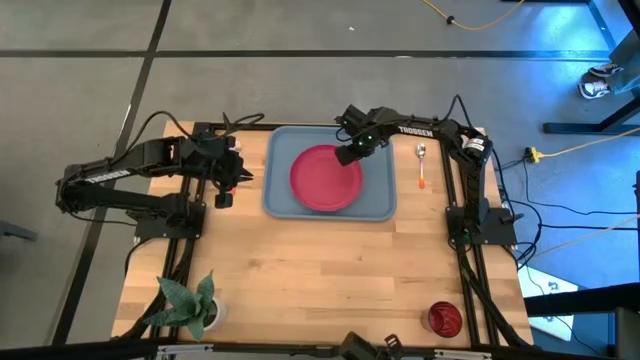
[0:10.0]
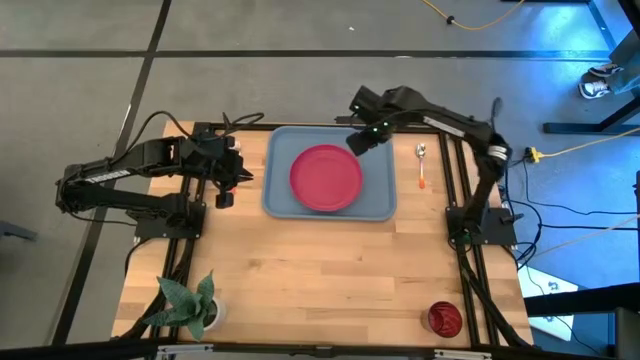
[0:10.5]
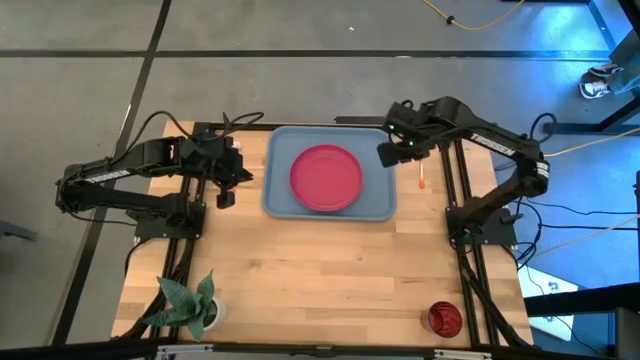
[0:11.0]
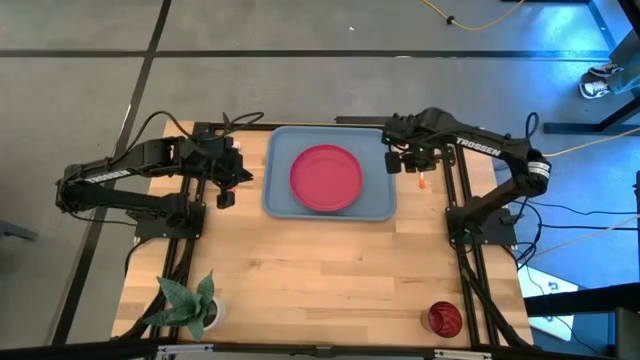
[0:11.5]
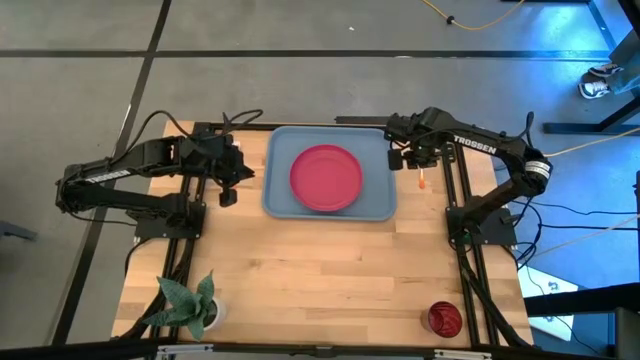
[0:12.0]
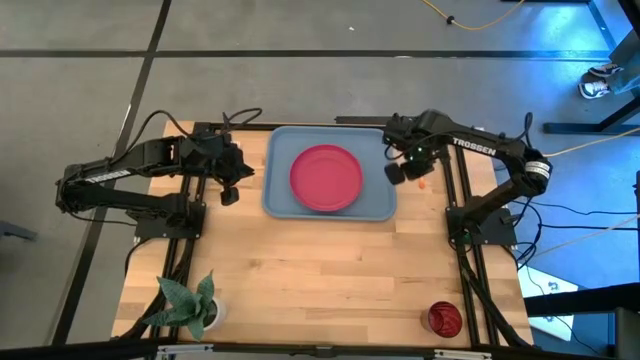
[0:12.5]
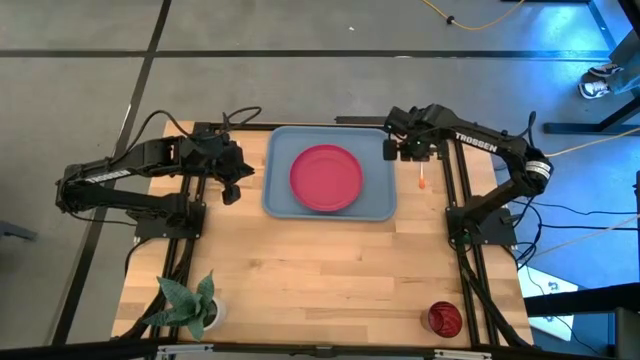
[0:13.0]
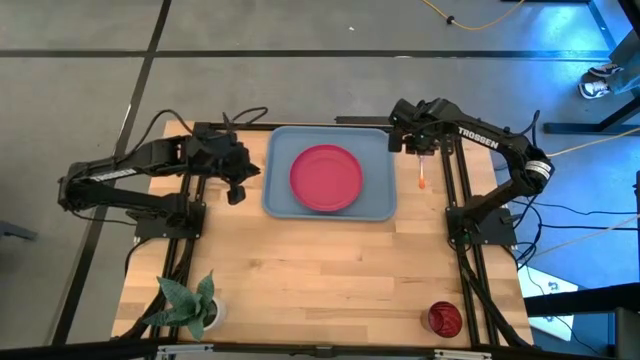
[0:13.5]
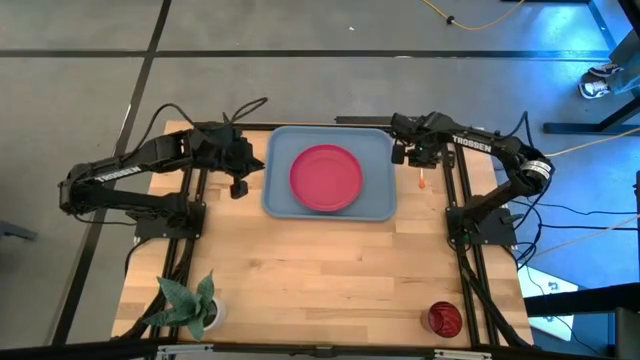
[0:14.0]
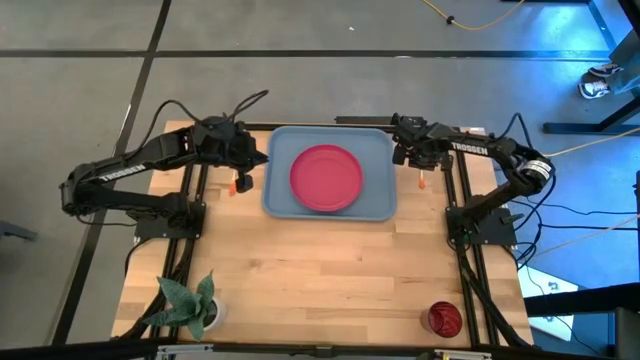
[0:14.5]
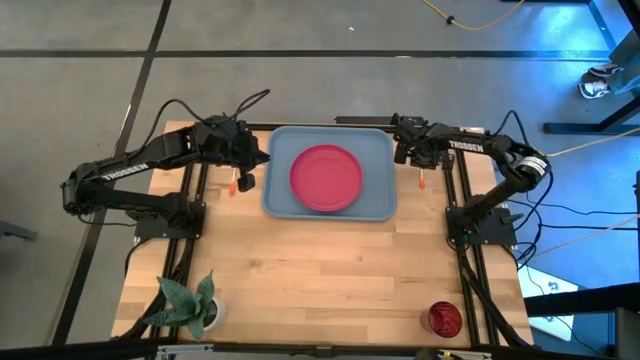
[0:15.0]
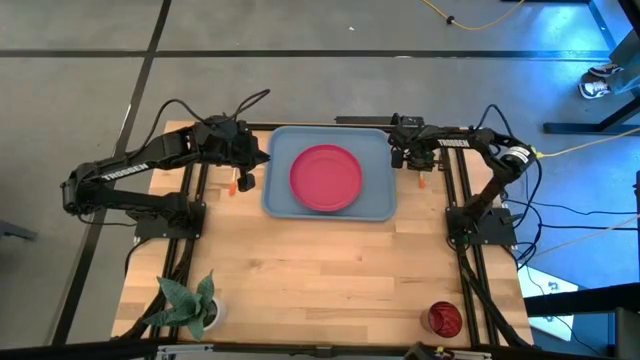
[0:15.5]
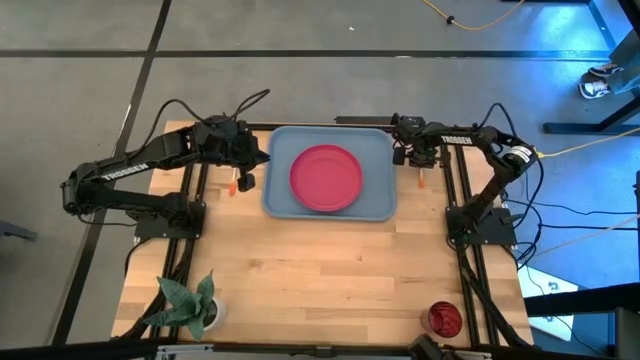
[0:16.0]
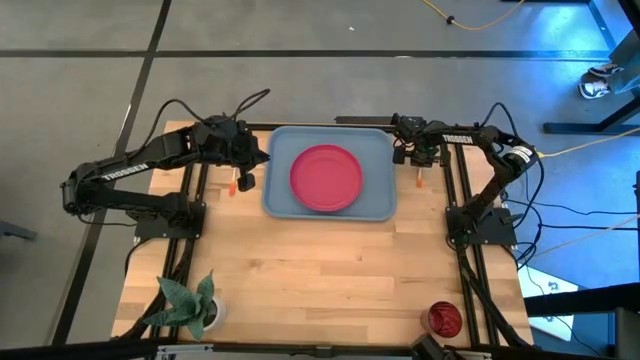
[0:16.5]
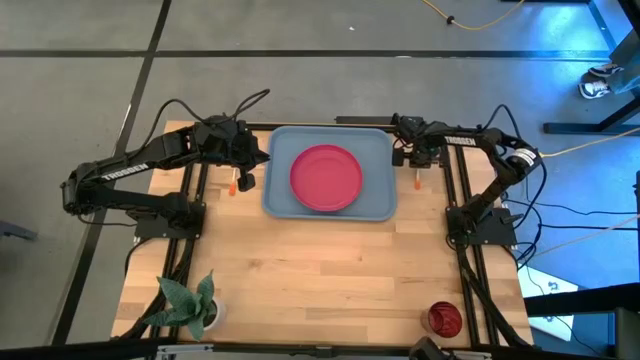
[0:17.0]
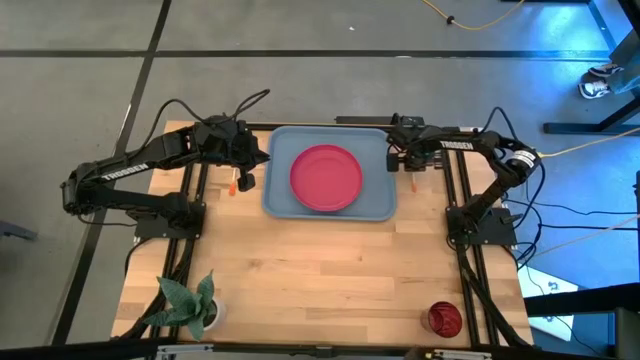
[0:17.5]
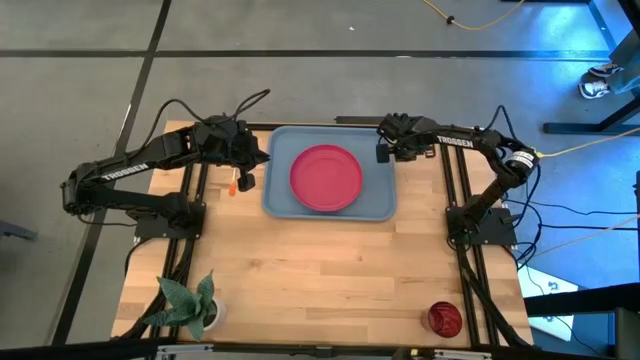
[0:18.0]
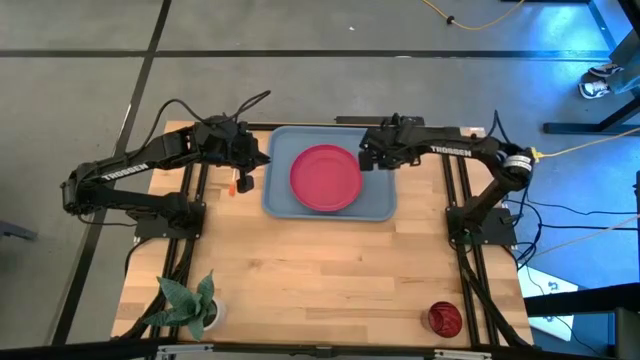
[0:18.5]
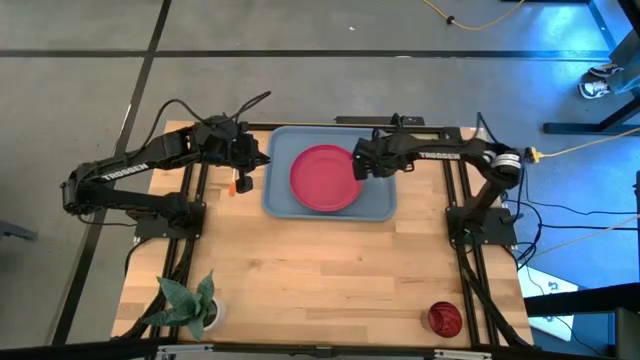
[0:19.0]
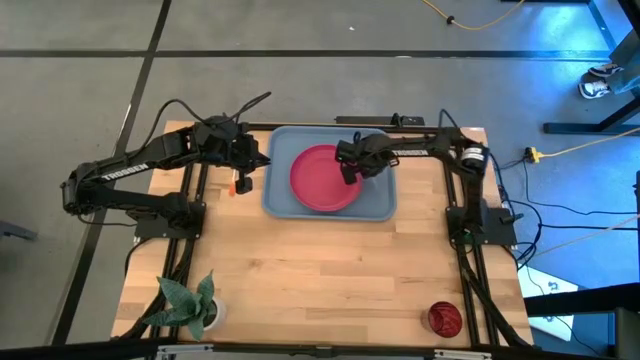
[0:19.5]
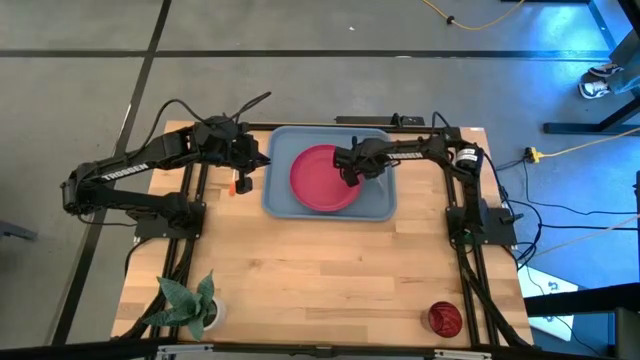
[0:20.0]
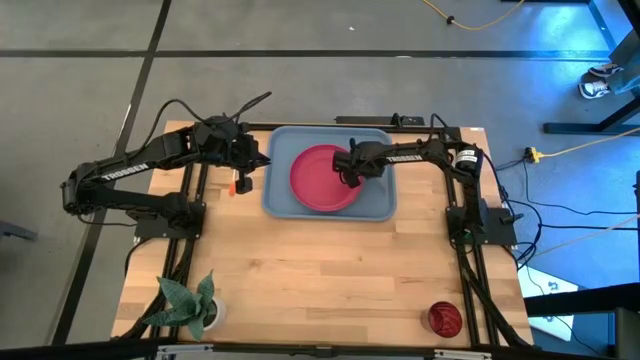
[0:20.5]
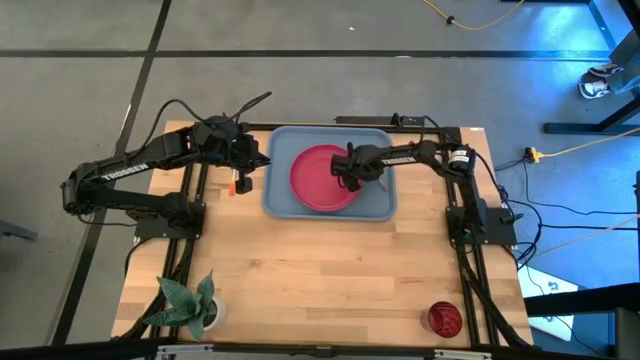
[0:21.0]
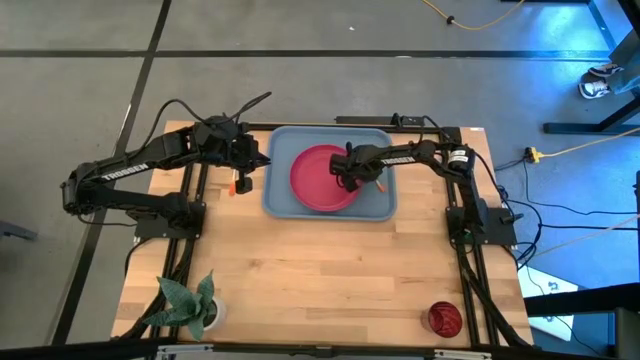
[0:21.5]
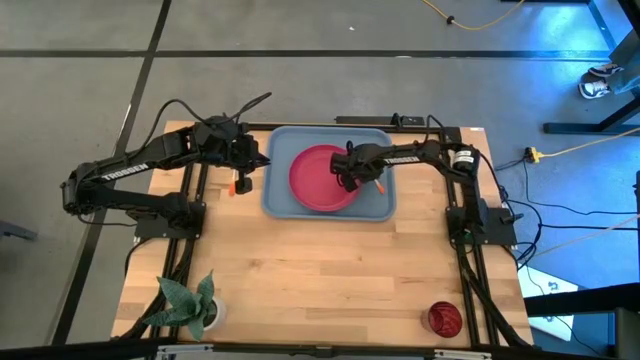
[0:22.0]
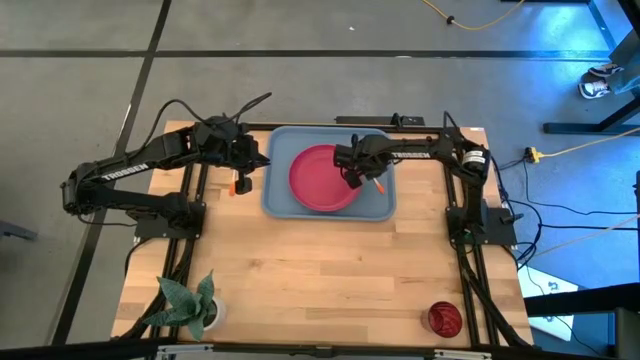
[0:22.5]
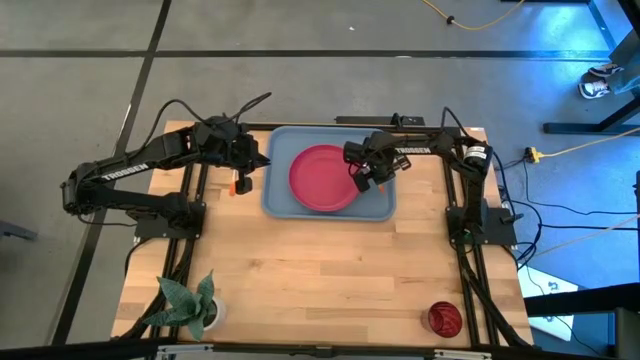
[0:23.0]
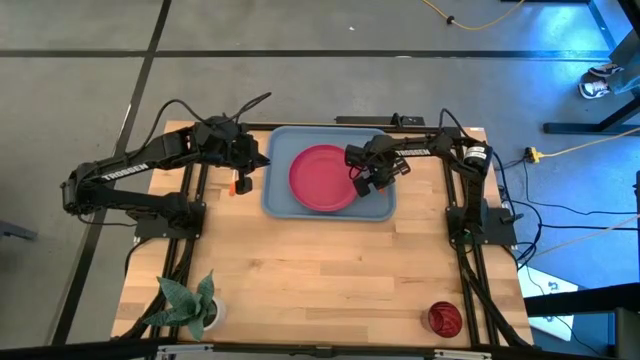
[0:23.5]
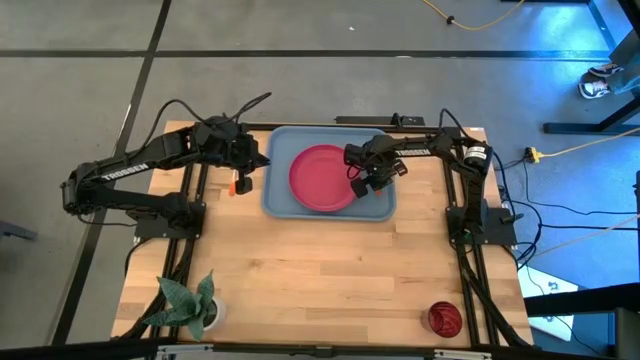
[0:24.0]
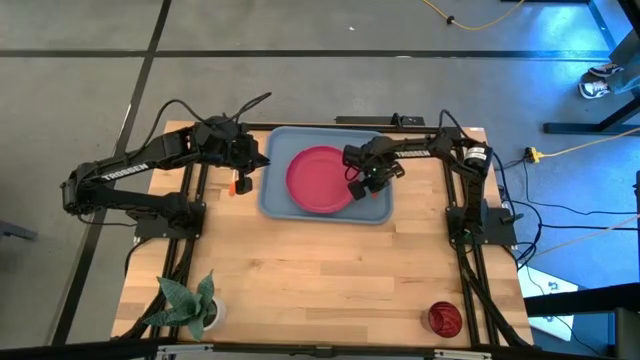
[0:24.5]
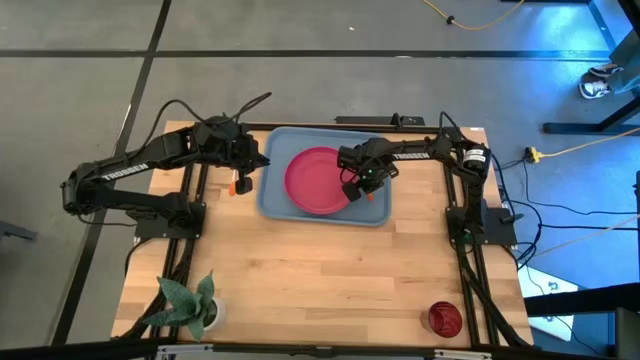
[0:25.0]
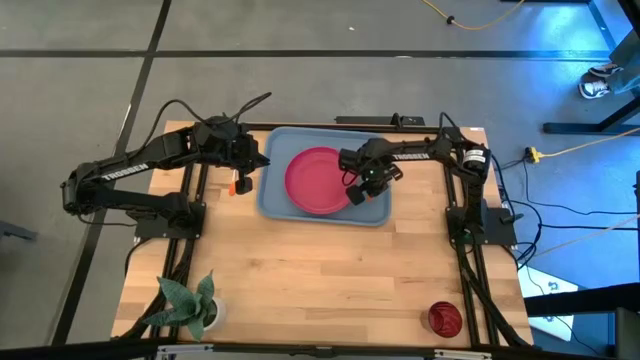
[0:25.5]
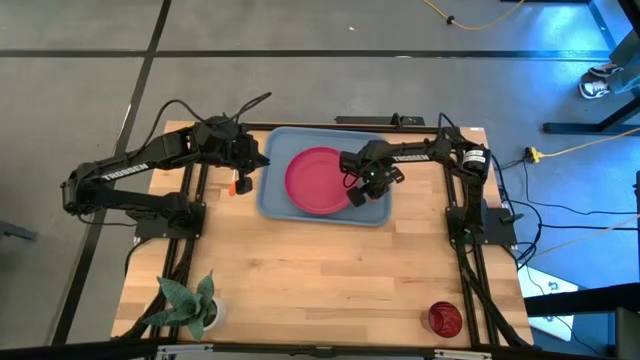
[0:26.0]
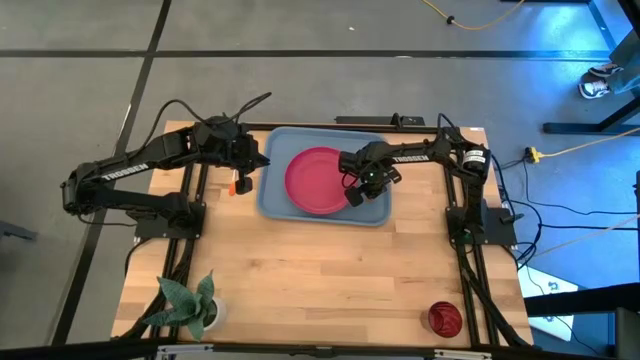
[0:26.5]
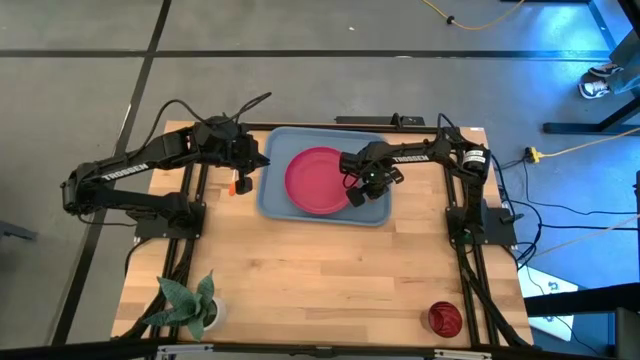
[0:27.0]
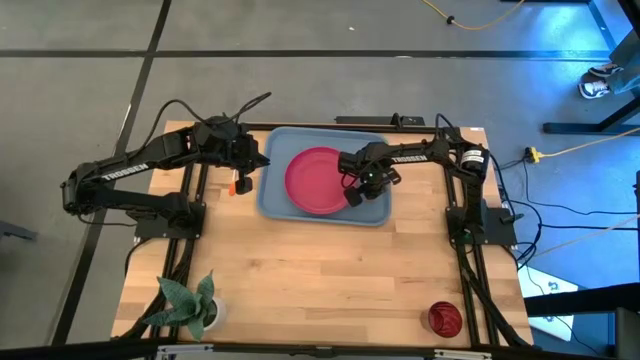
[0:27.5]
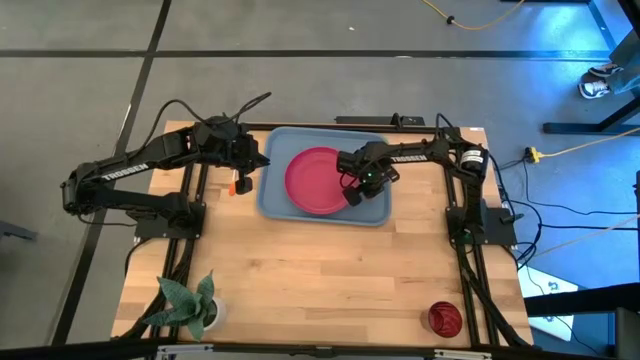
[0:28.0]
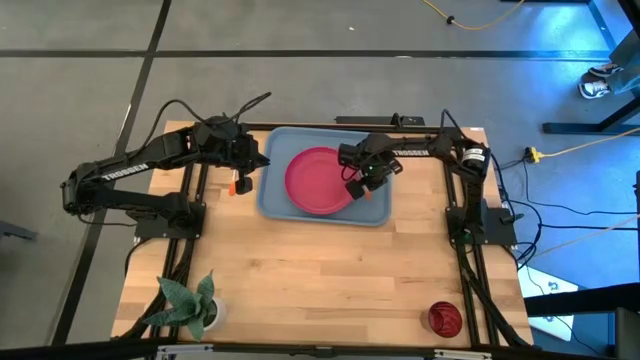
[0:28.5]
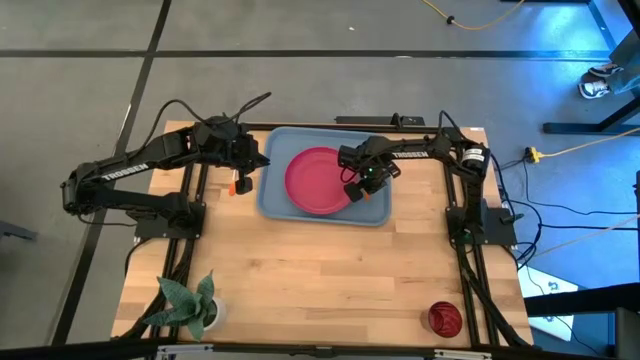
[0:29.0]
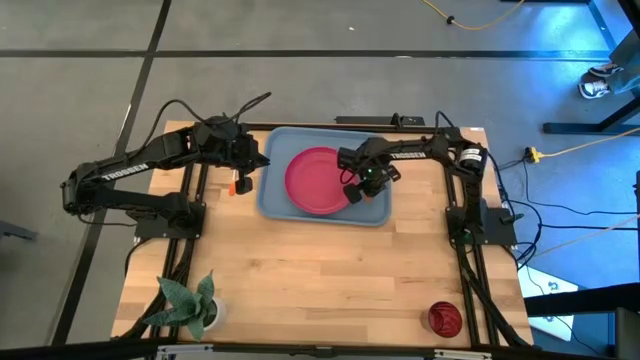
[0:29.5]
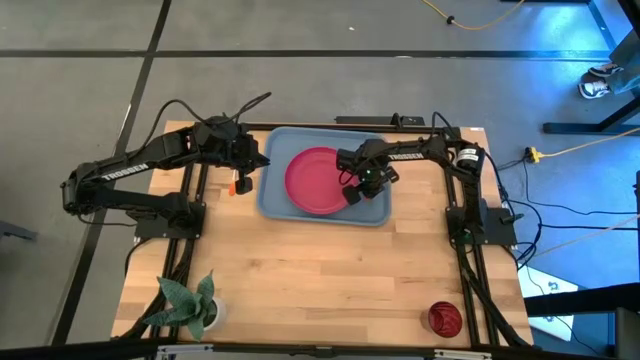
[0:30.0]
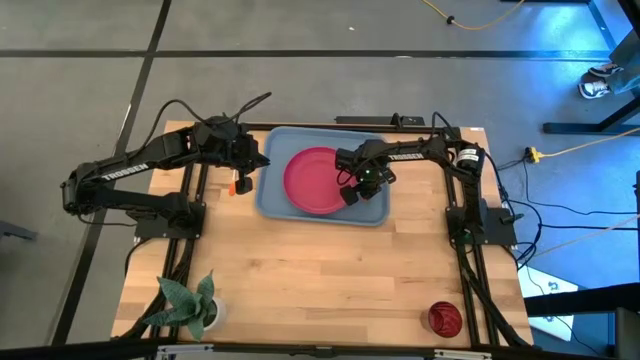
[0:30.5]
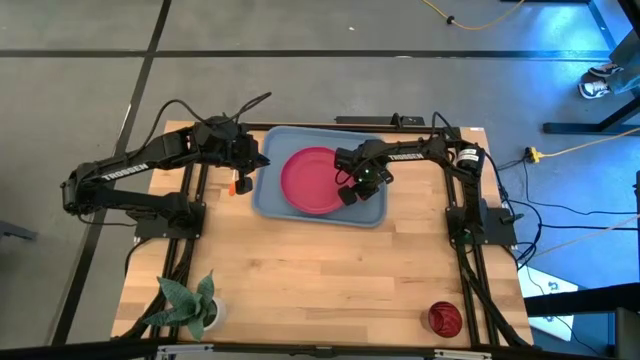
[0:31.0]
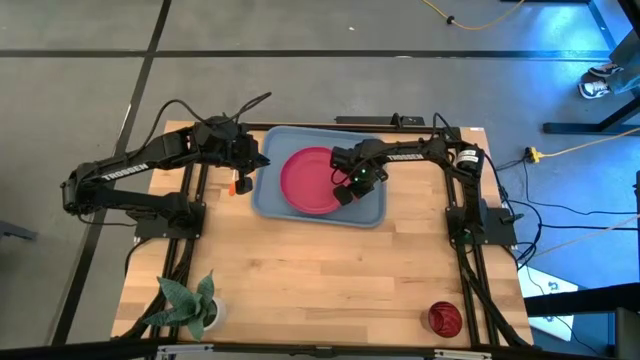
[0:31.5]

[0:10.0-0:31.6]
Task: Pick and place plate/cup/fork/spoon on tray
Put the orange spoon on the blue serving tray at the right of the pink plate

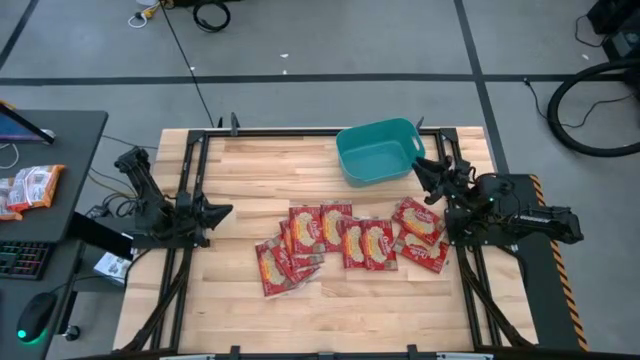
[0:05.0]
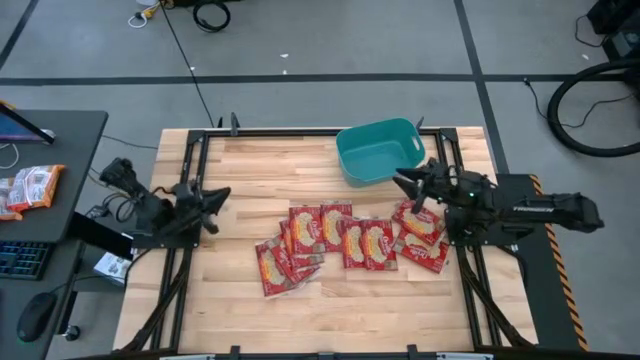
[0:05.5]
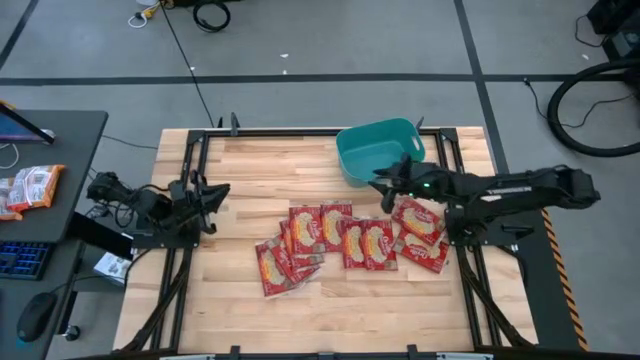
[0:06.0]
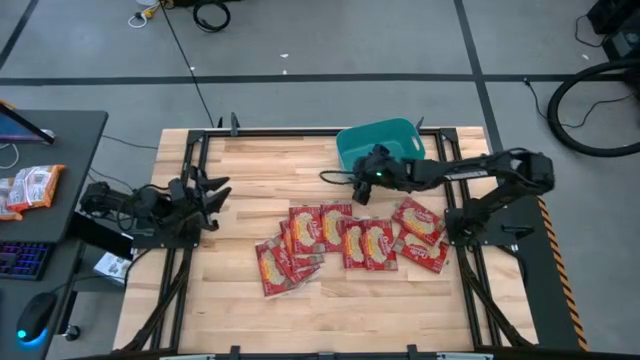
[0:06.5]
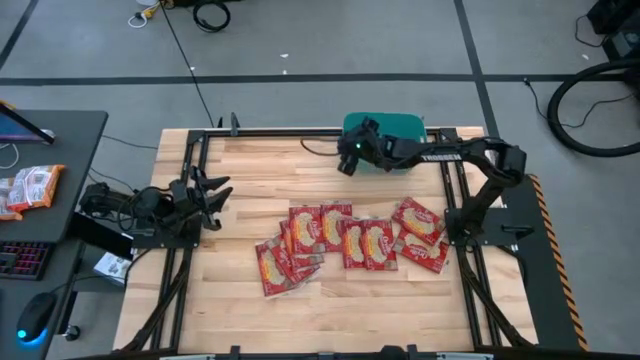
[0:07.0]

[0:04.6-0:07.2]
Task: Sort popcorn bags into baskets
Adjust the green bin
